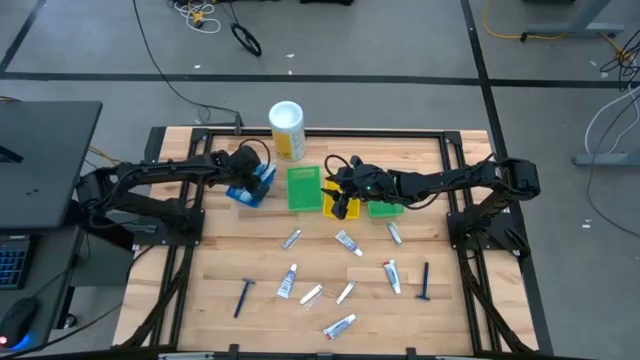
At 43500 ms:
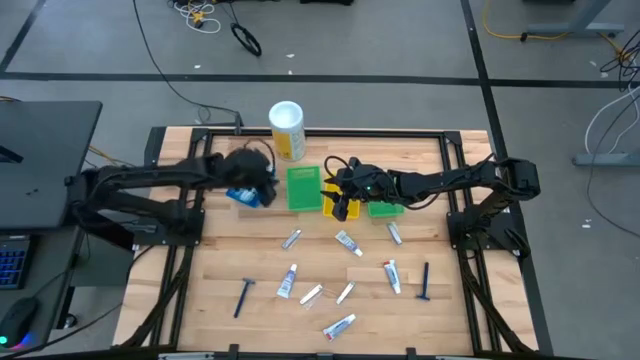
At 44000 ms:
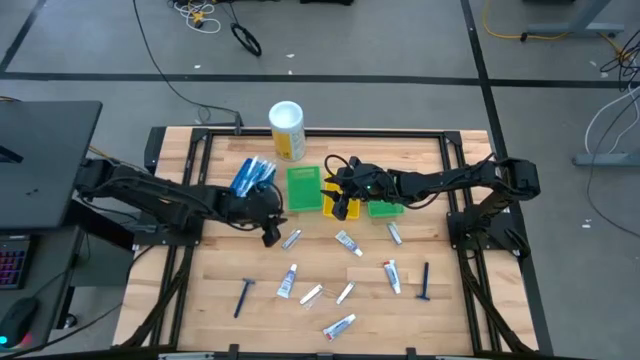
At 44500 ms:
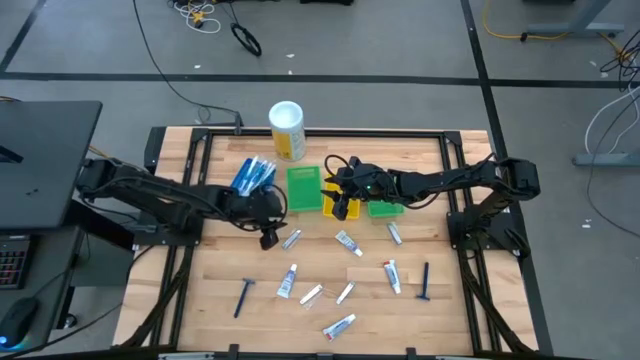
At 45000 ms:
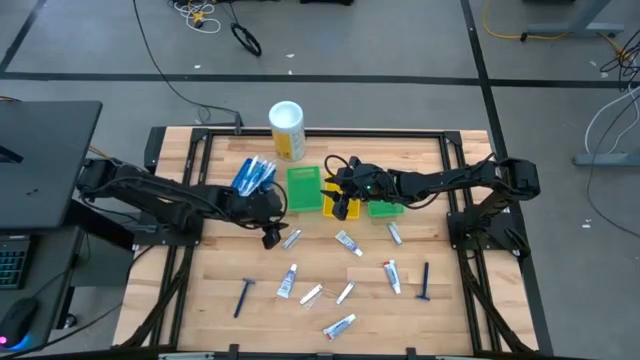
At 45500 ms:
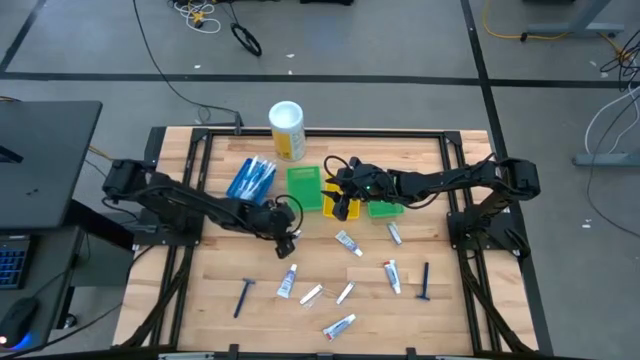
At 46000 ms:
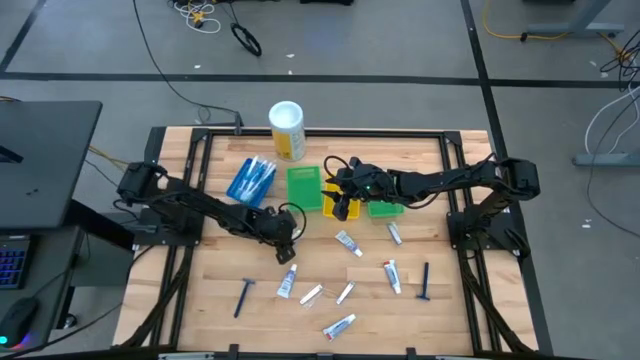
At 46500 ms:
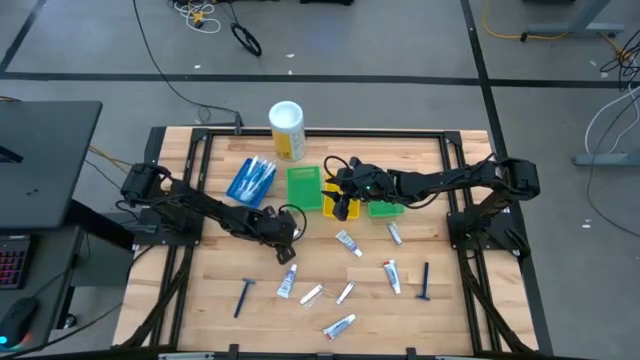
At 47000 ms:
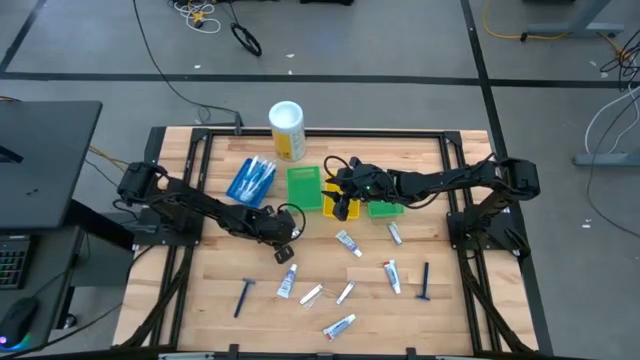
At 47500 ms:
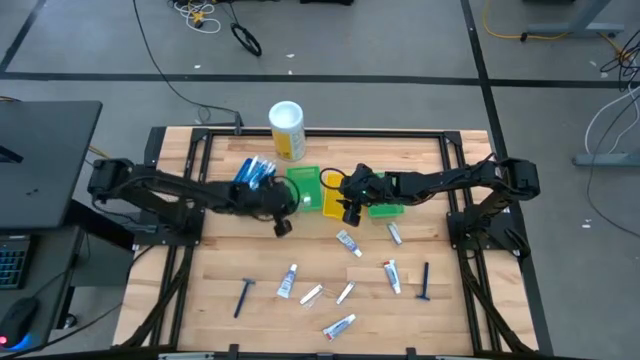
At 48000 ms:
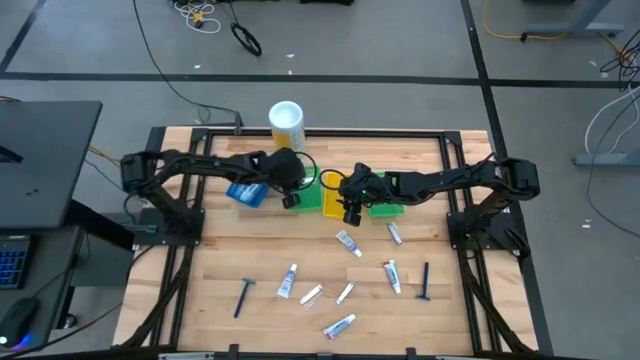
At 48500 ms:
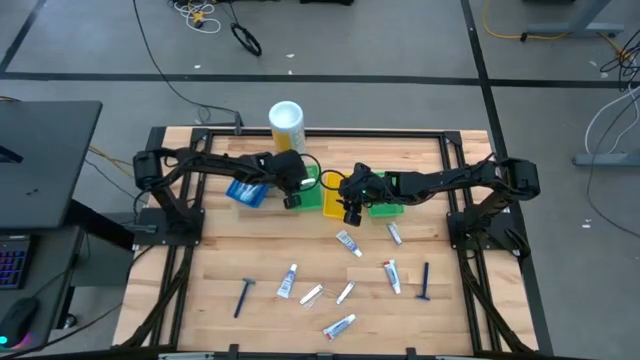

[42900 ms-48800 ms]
Task: Pick & Place Travel size toiletries
Put the nailcutter into the left green bin

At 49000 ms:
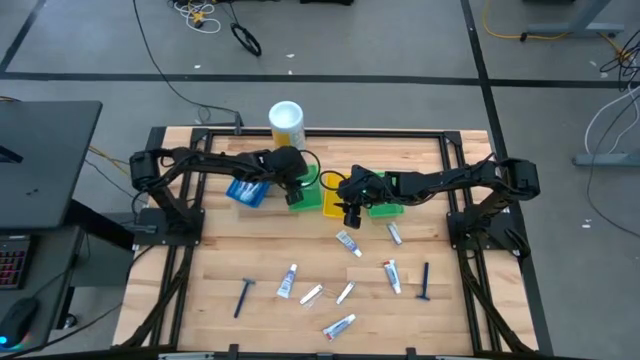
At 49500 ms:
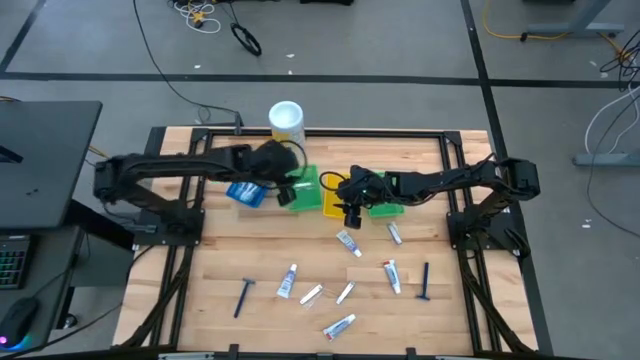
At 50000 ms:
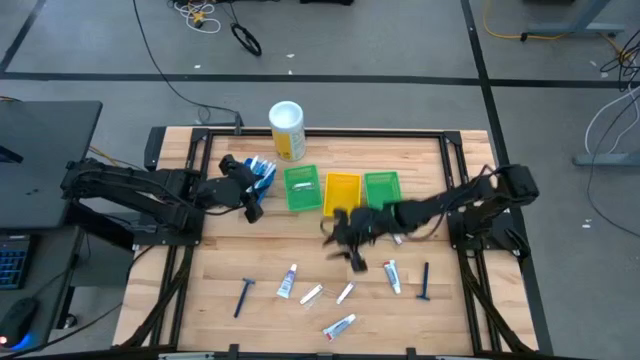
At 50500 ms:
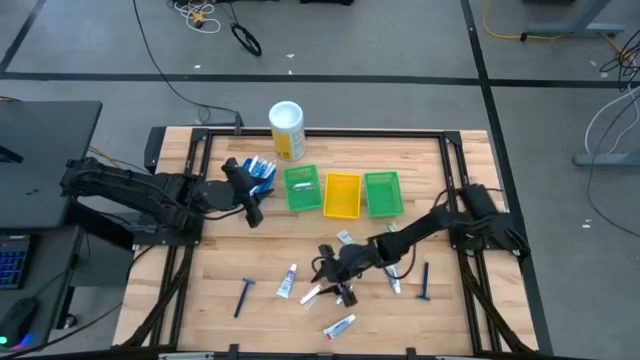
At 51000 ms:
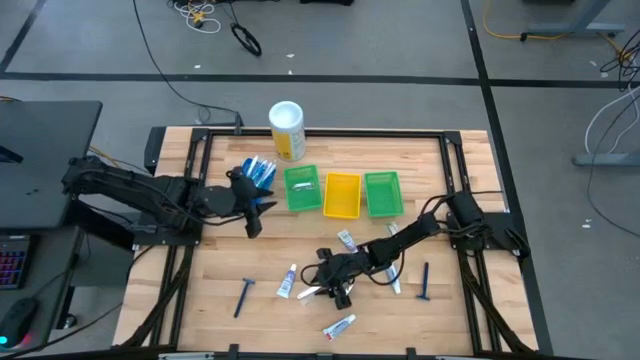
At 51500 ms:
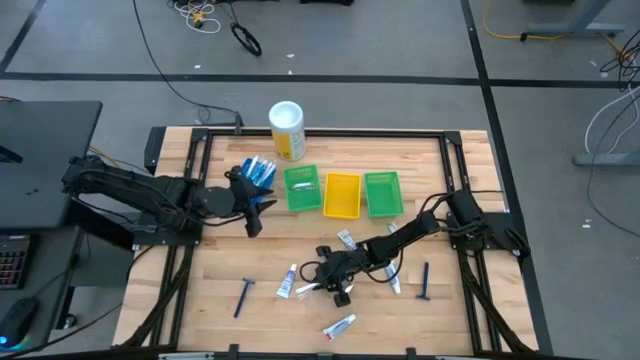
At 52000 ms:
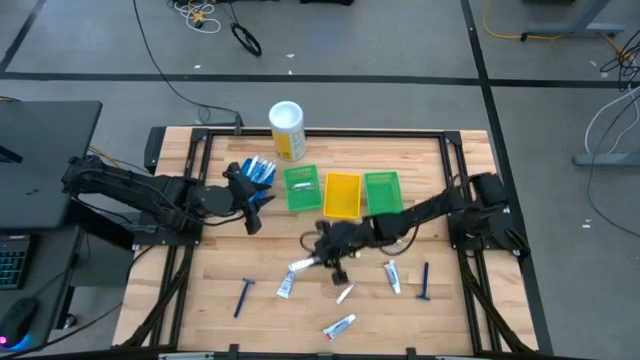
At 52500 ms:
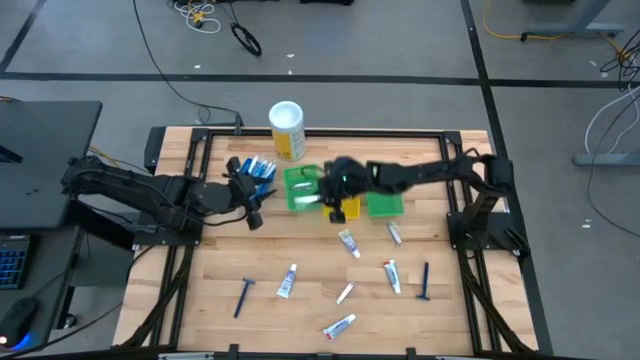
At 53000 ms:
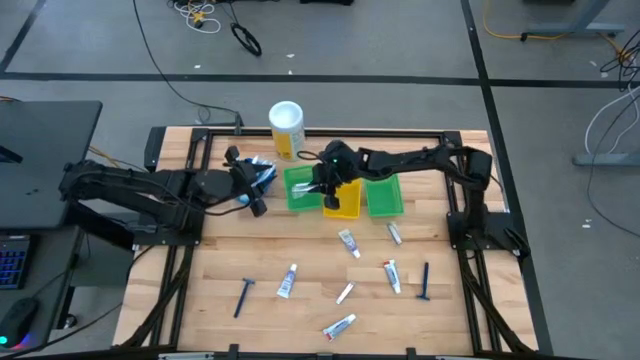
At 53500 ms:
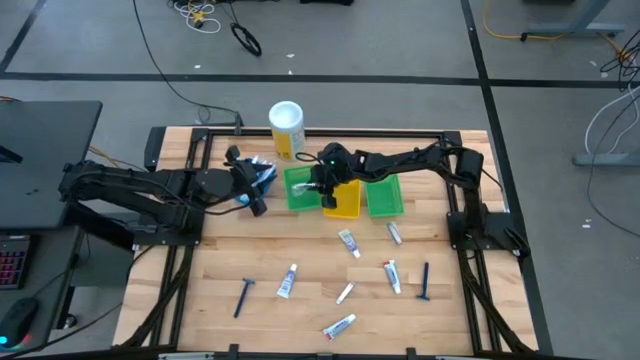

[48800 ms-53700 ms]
Put the nailcutter into the left green bin

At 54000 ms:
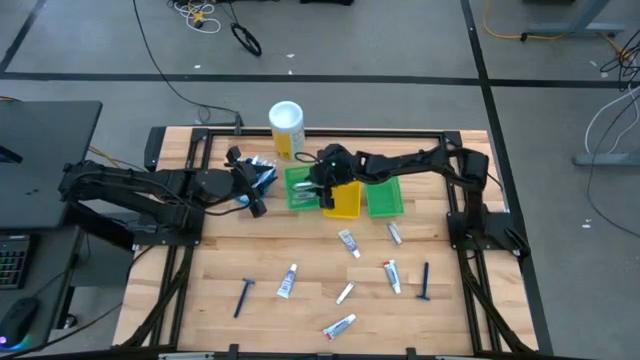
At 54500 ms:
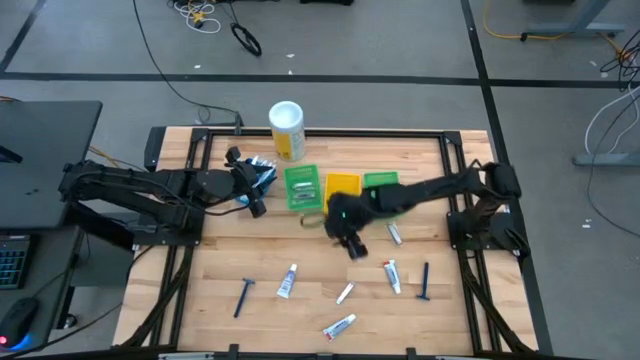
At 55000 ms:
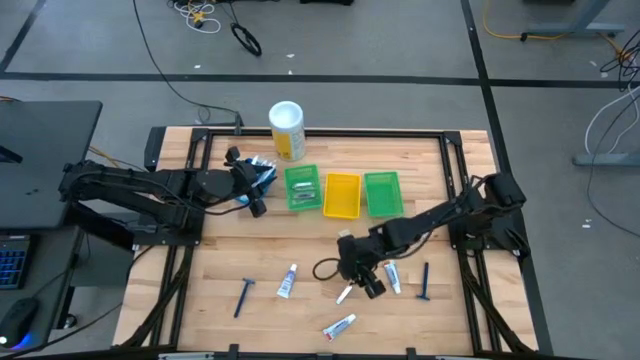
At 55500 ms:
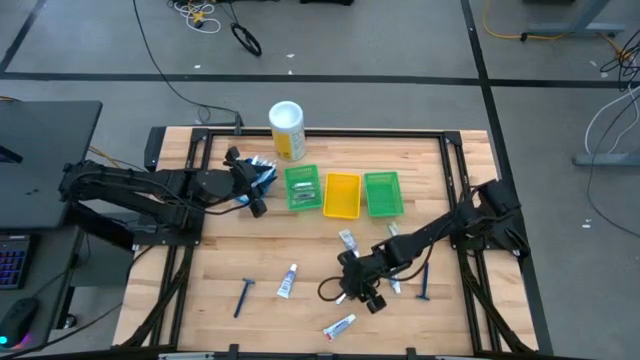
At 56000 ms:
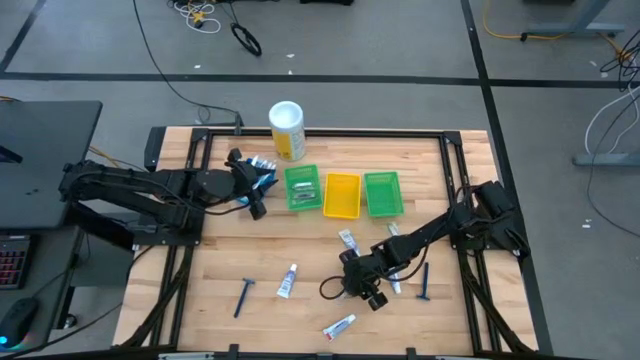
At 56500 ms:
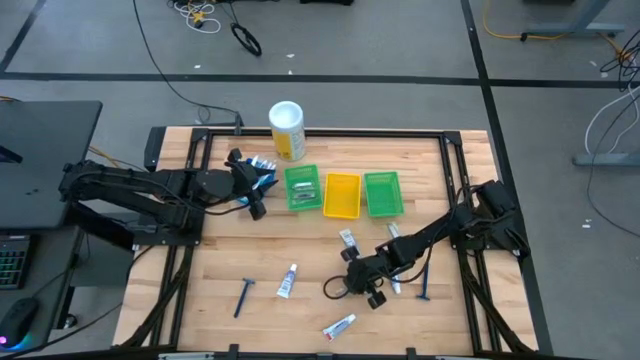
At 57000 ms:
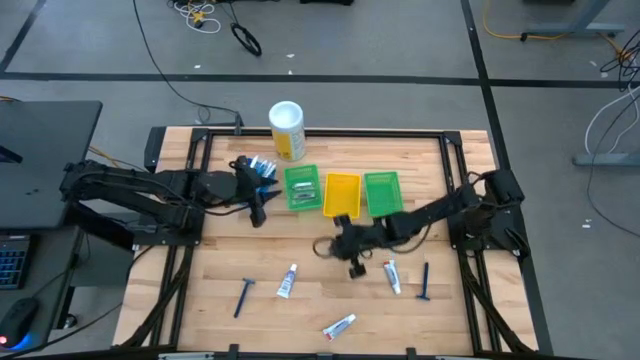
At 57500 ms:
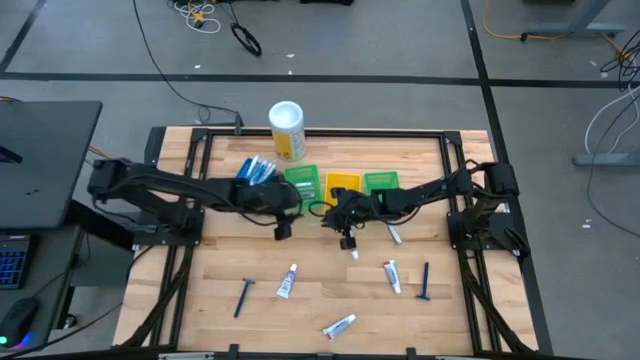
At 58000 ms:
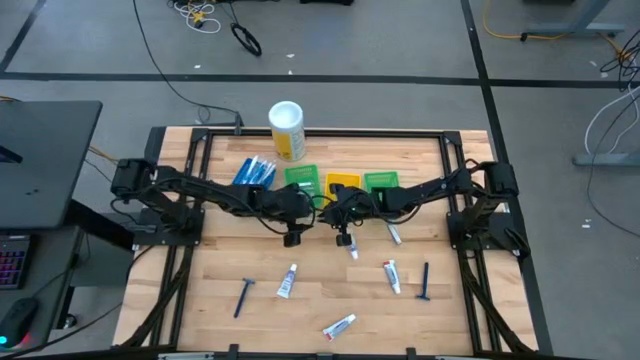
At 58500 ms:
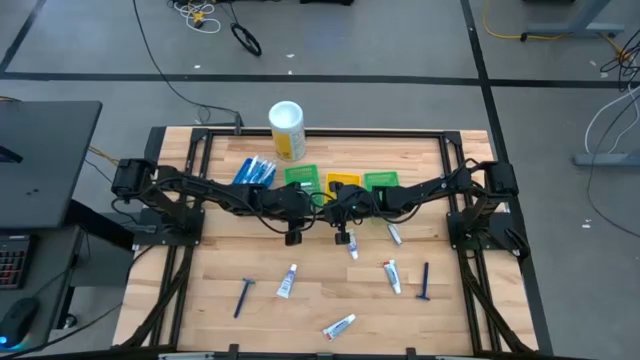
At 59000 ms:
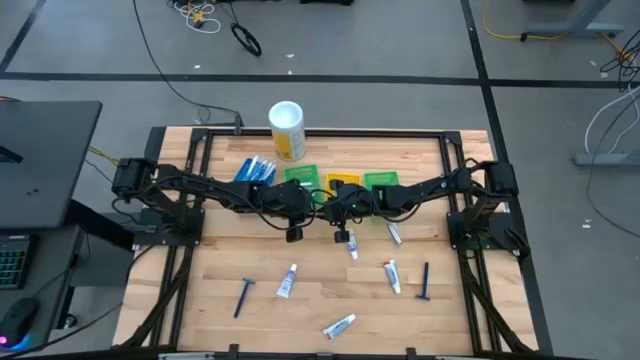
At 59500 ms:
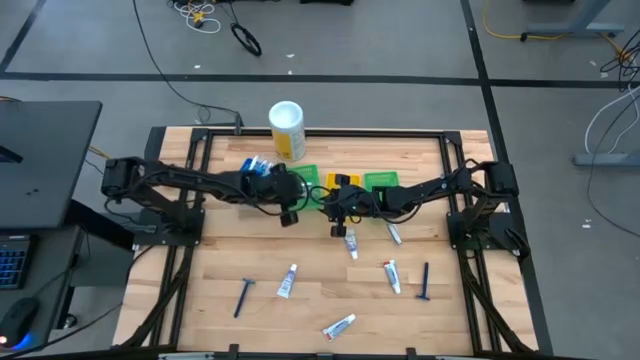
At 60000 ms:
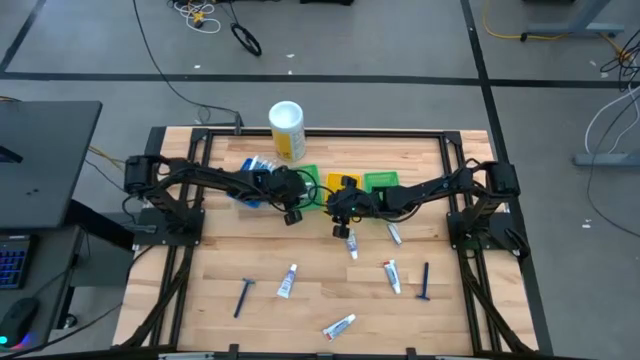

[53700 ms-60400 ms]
Put the nailcutter into the left green bin

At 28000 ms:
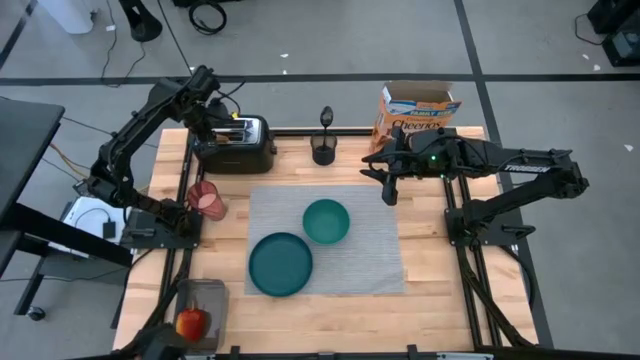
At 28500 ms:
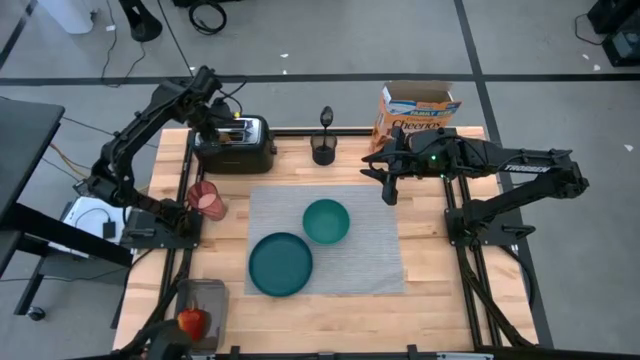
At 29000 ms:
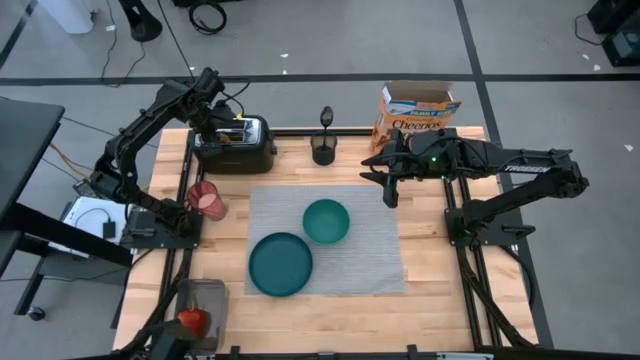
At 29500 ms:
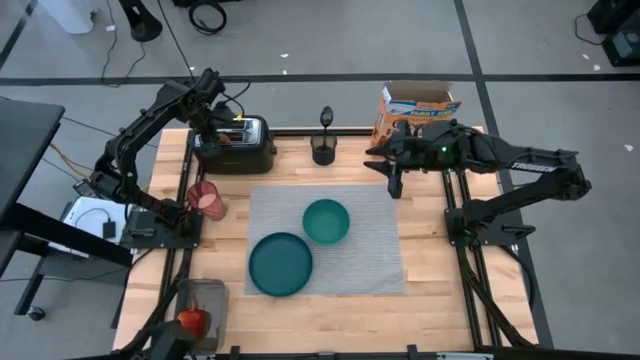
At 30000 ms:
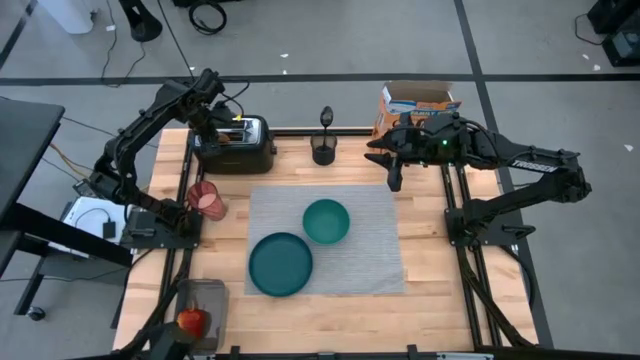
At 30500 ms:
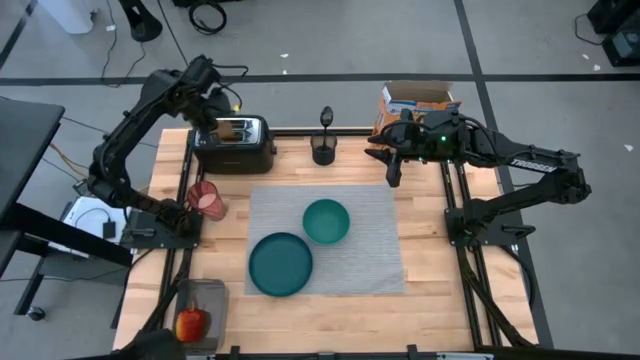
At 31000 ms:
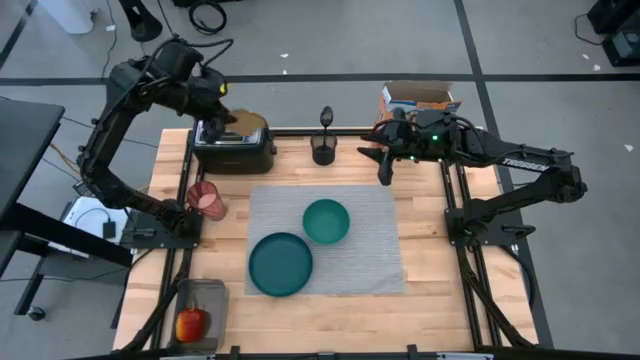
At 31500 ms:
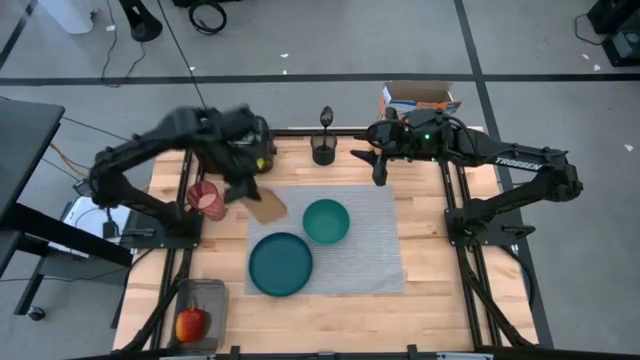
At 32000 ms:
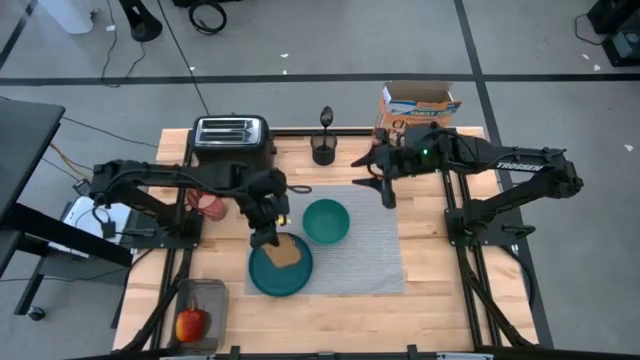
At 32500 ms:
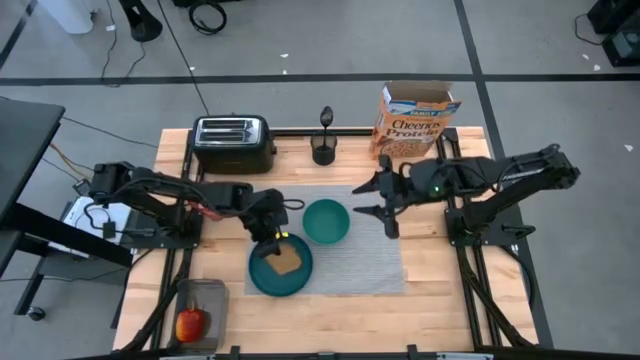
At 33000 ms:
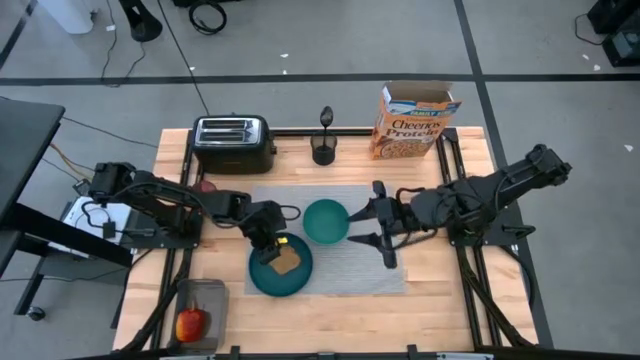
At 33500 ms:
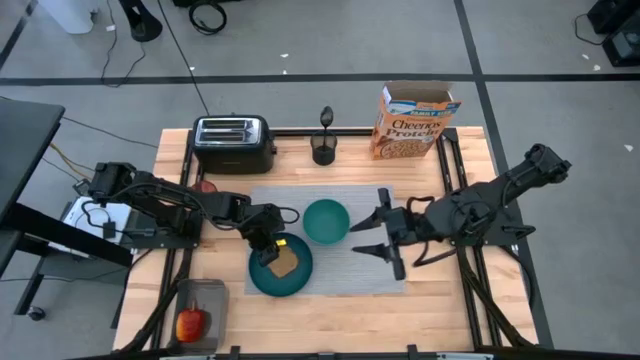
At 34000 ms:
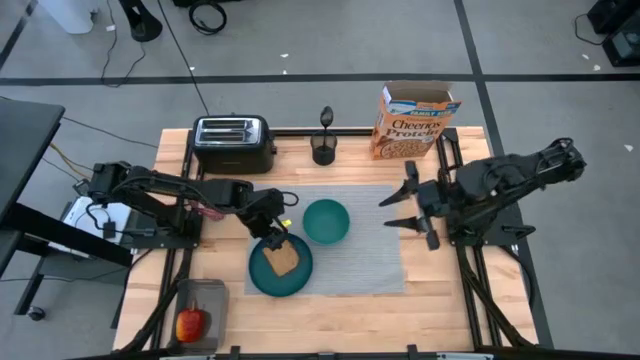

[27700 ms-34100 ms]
Task: Arrange a breakfast setting
Put the bread from the toaster on the dark green plate
